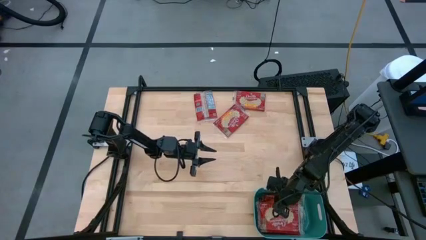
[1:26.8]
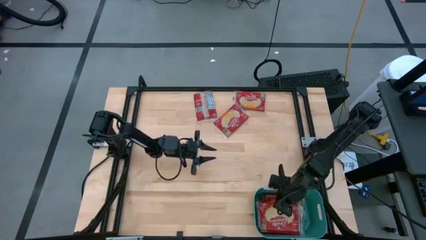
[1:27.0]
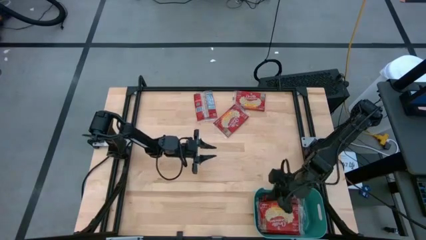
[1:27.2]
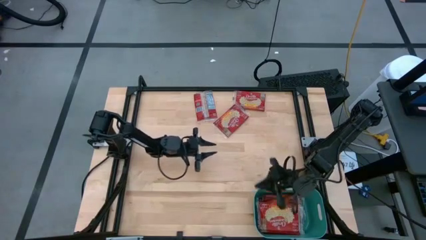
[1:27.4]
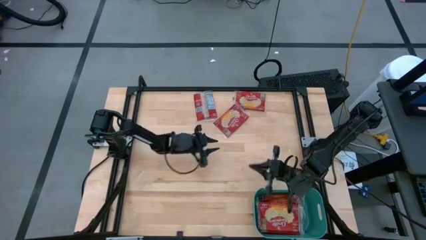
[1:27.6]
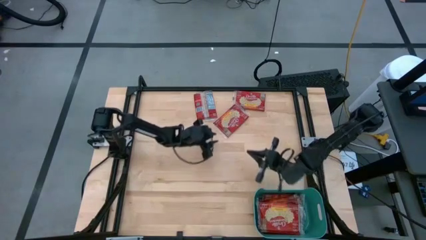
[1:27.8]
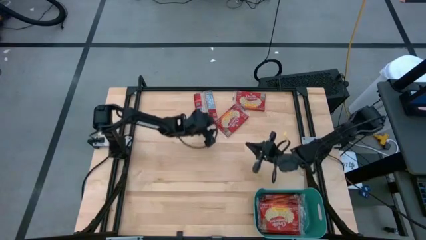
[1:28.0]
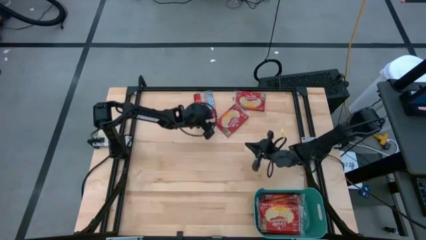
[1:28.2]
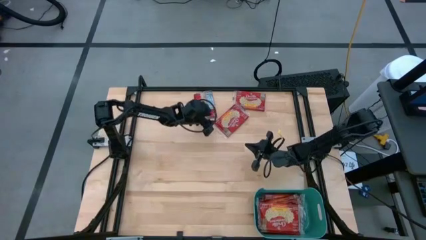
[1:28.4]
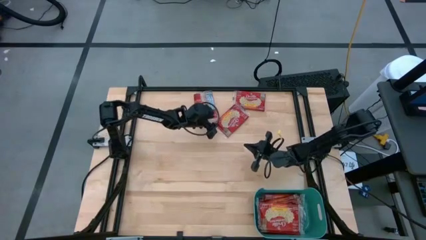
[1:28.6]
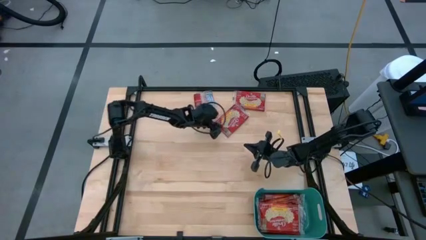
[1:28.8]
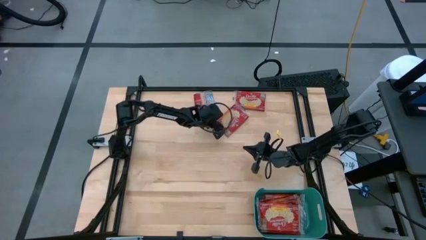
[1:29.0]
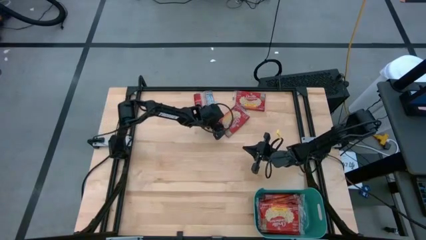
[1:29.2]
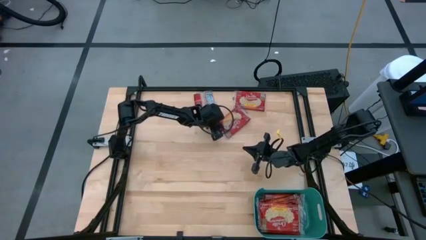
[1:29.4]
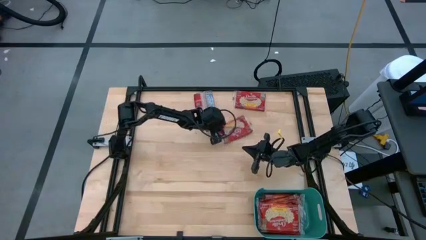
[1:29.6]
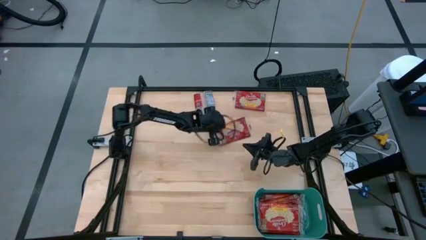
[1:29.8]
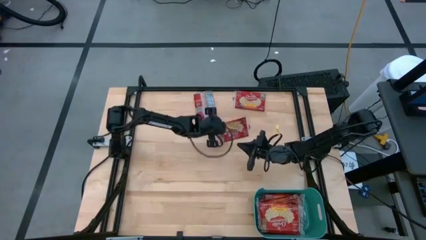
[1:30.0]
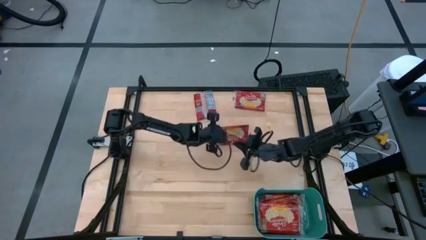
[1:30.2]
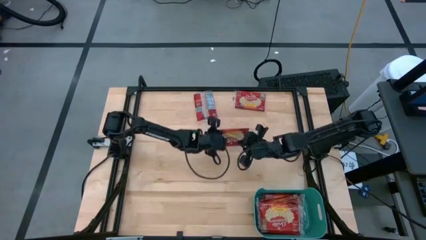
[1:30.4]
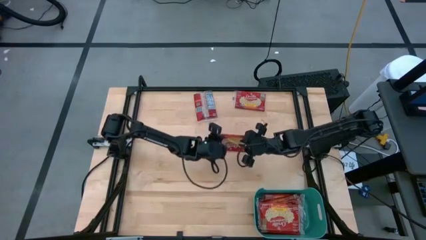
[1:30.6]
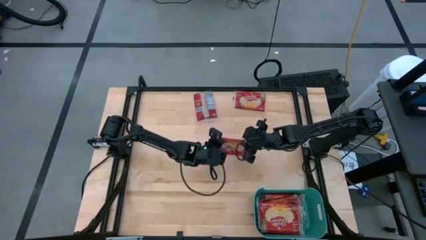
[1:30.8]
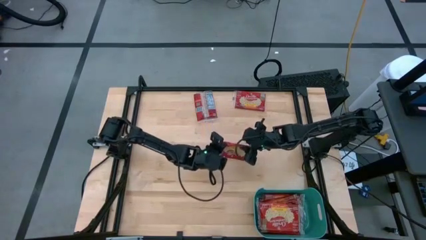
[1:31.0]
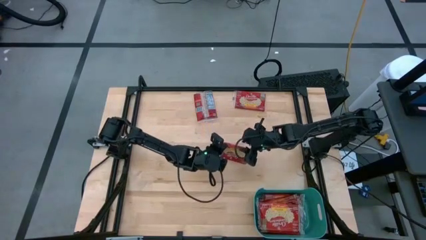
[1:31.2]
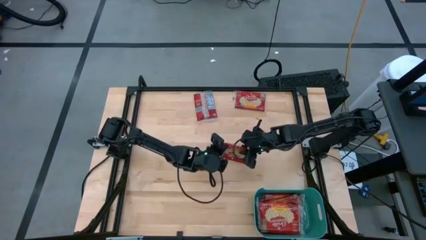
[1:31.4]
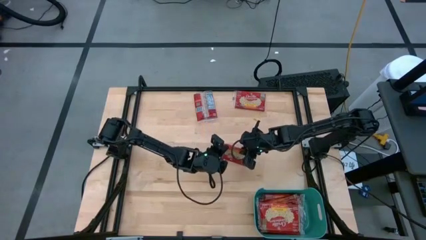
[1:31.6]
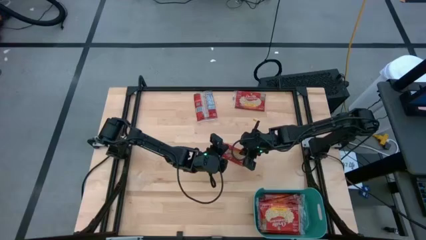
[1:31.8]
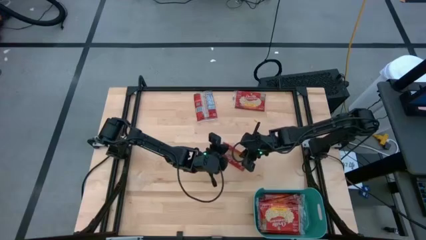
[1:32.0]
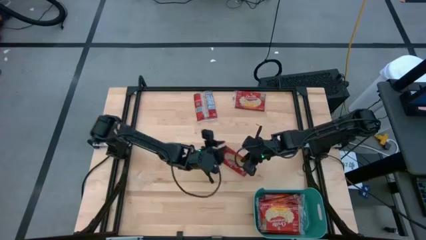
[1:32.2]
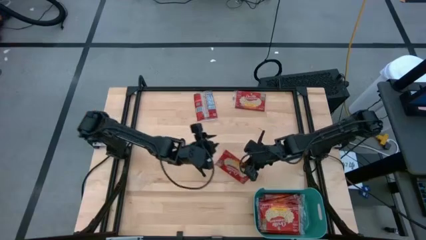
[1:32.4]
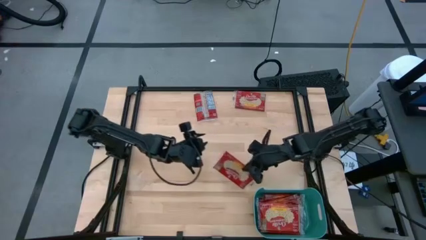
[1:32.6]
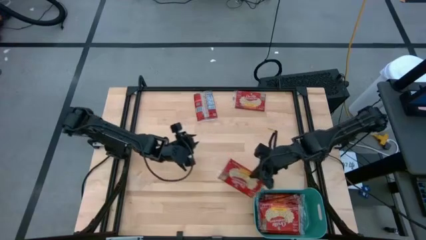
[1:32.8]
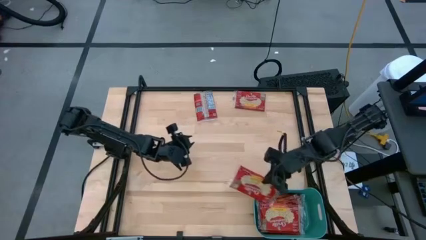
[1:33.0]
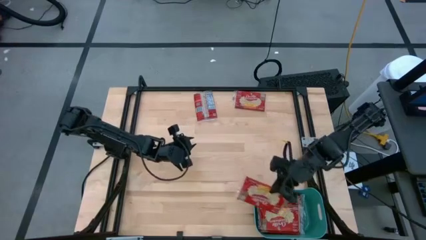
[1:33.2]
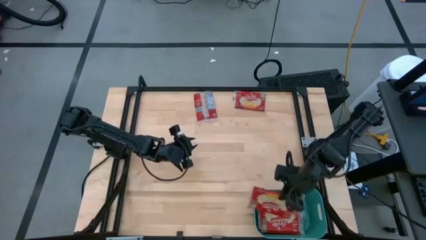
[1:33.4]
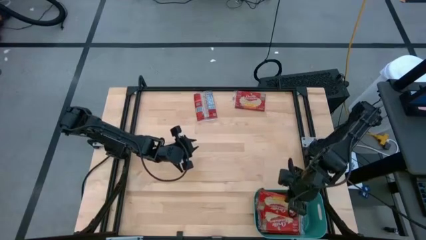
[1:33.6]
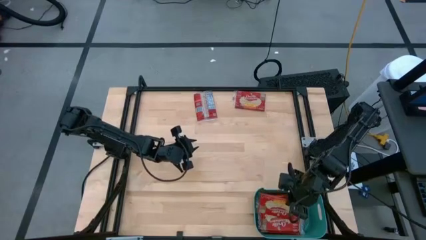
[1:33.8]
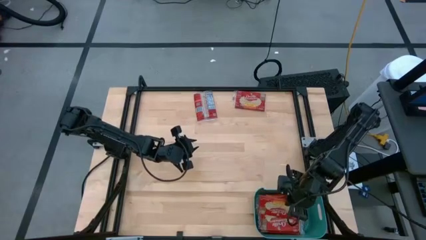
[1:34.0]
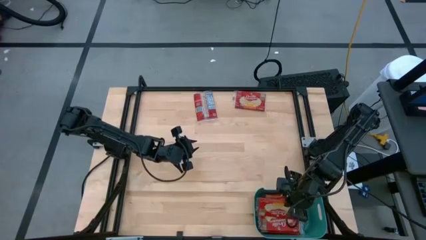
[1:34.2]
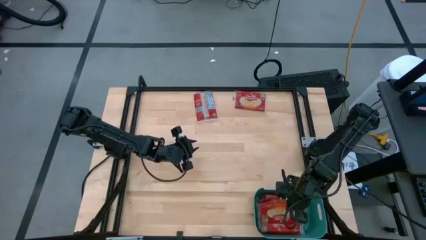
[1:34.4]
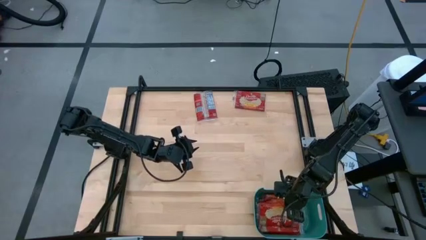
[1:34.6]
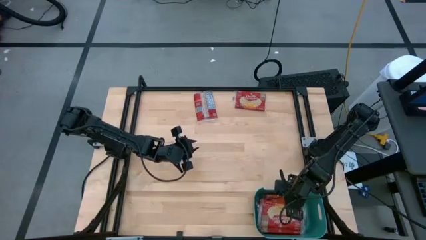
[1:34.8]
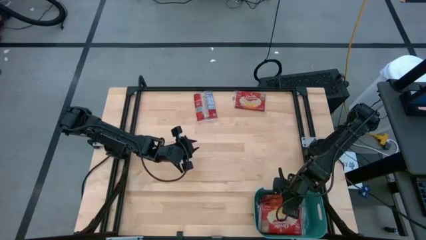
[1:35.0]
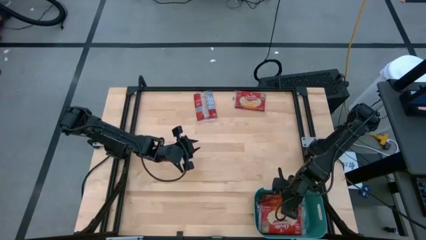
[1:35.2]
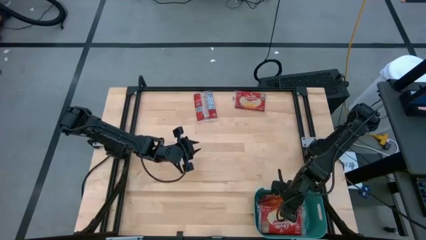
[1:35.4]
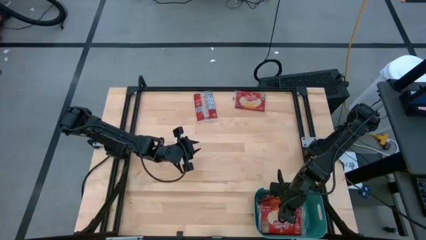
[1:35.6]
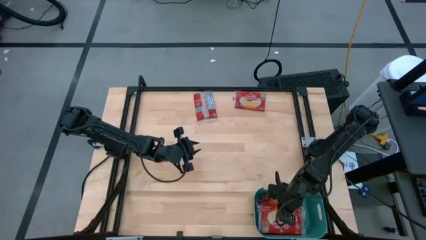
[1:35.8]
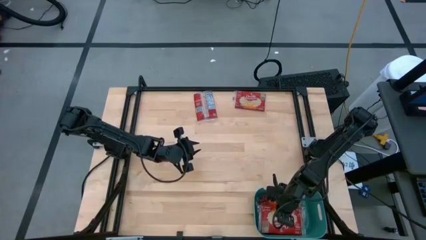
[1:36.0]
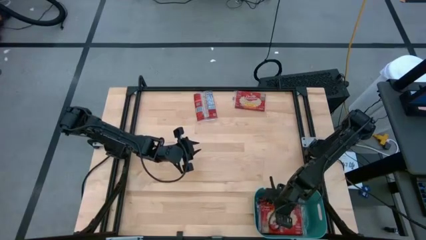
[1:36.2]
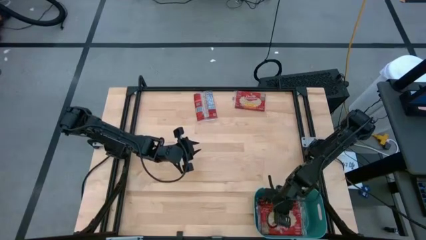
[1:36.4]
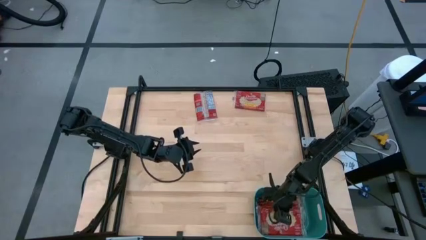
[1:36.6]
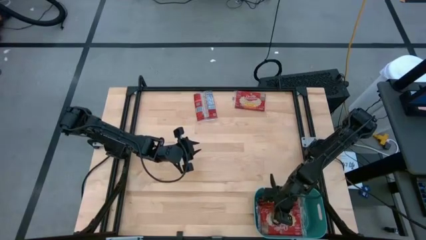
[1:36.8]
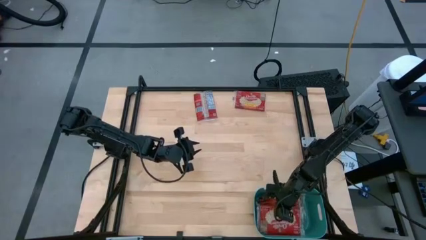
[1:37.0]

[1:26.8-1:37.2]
Task: Sort popcorn bags into baskets
Put the bottom popcorn bag into the green bin

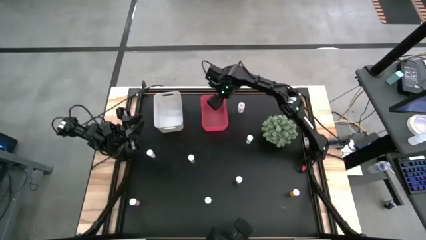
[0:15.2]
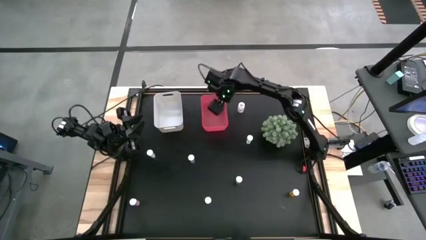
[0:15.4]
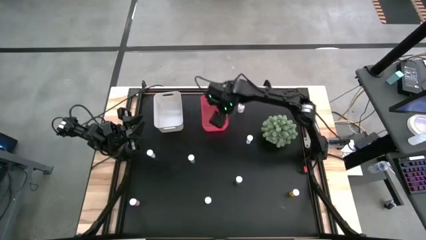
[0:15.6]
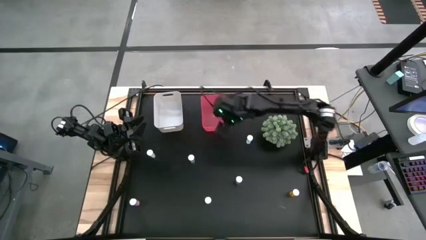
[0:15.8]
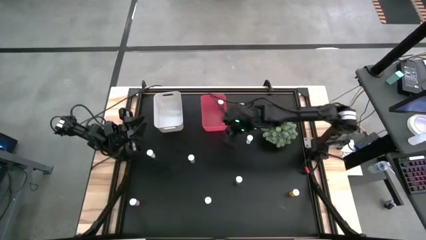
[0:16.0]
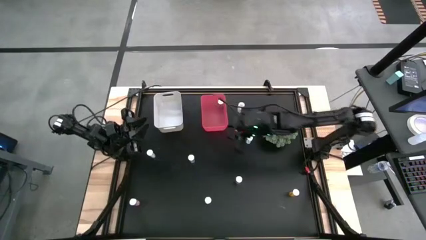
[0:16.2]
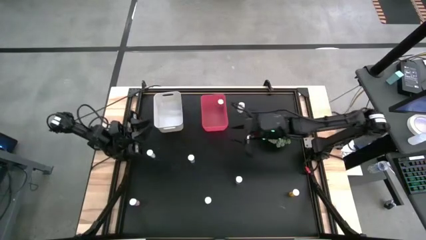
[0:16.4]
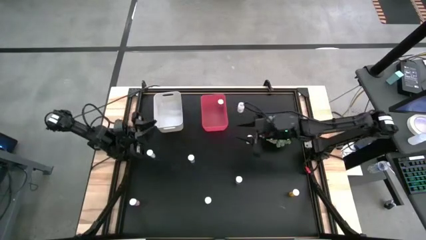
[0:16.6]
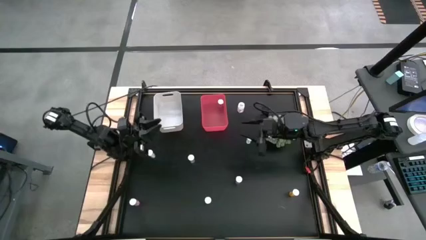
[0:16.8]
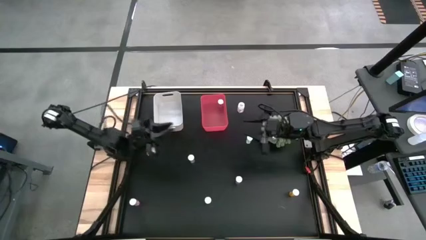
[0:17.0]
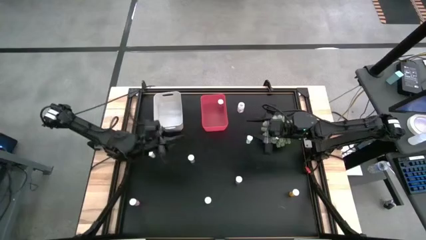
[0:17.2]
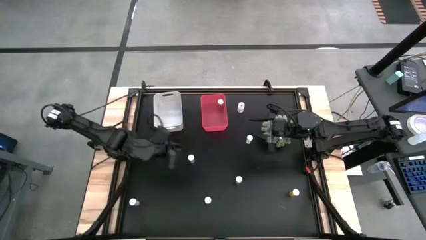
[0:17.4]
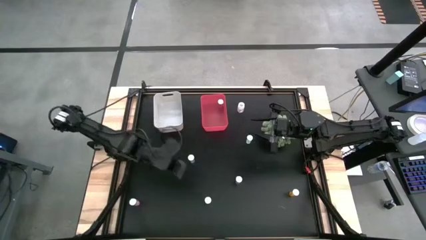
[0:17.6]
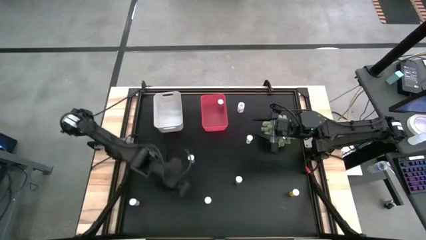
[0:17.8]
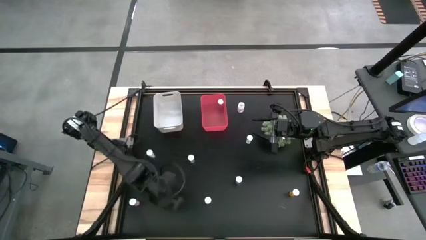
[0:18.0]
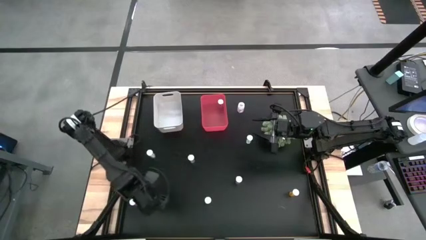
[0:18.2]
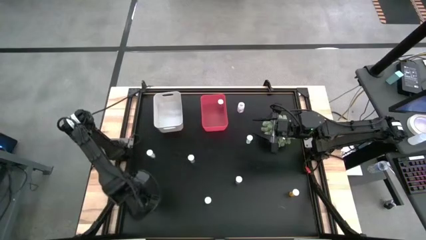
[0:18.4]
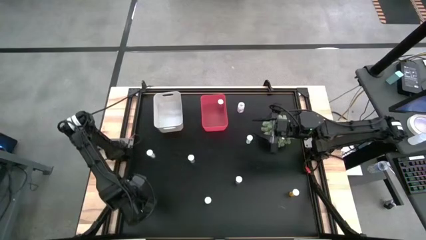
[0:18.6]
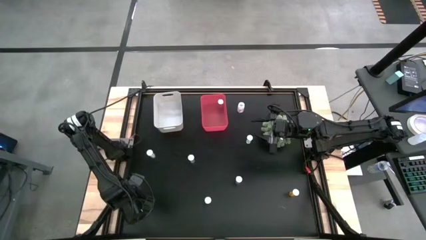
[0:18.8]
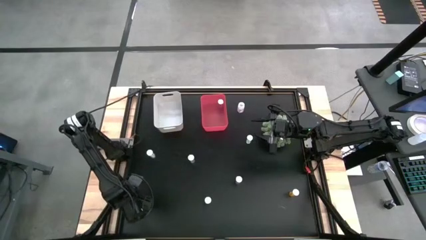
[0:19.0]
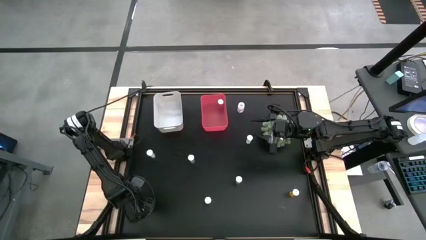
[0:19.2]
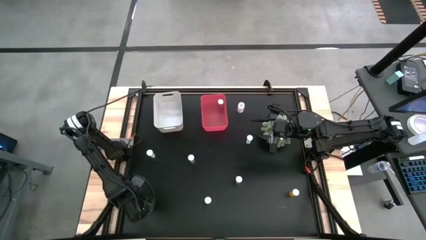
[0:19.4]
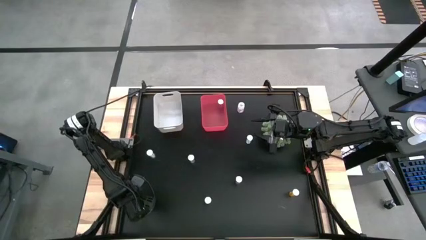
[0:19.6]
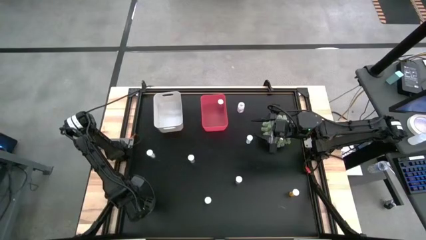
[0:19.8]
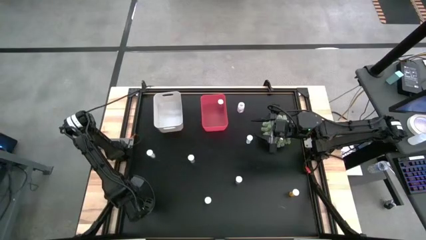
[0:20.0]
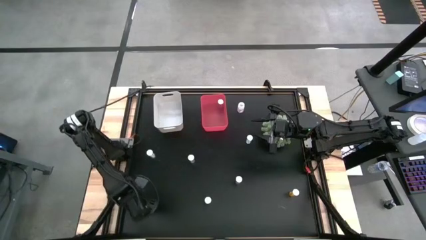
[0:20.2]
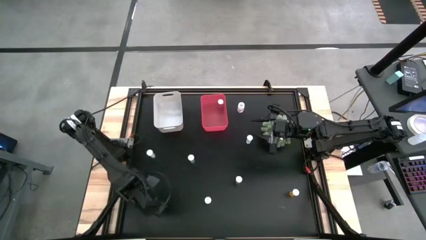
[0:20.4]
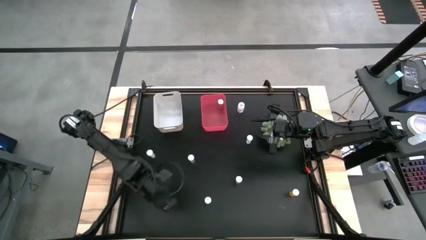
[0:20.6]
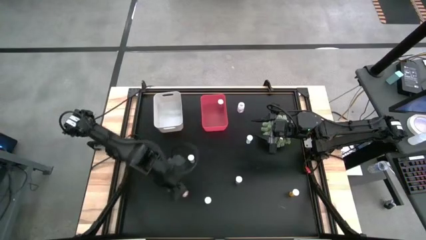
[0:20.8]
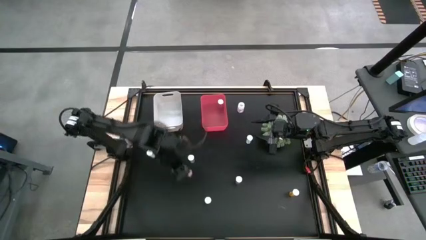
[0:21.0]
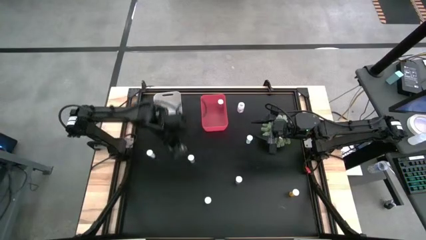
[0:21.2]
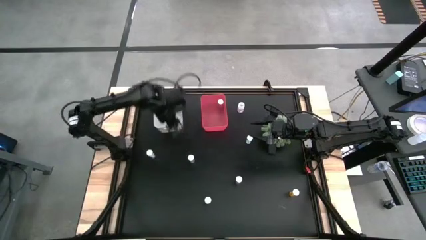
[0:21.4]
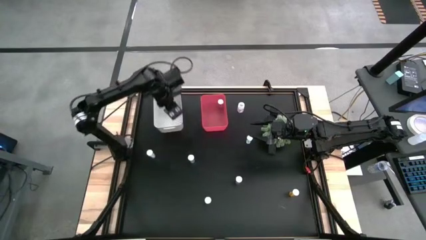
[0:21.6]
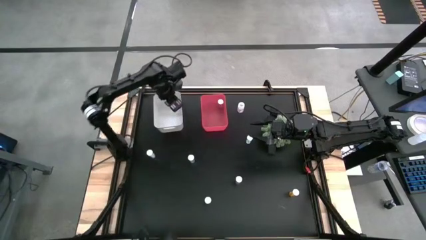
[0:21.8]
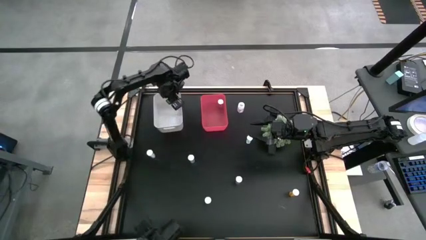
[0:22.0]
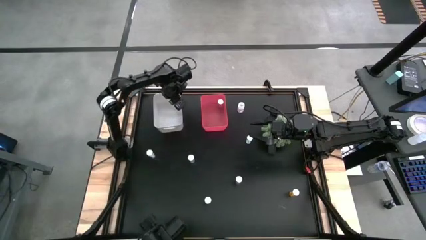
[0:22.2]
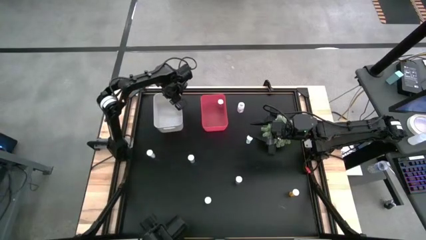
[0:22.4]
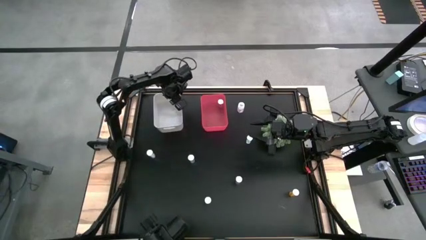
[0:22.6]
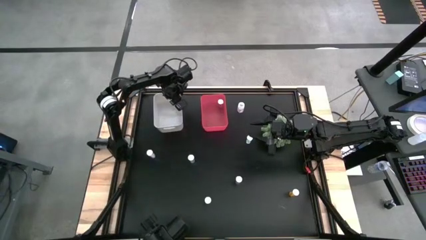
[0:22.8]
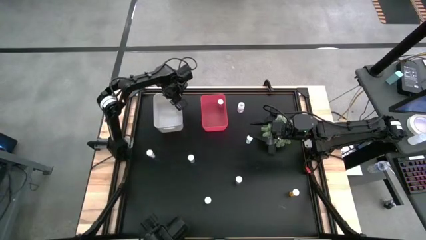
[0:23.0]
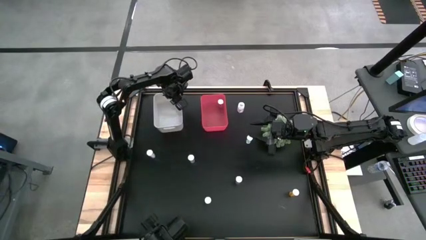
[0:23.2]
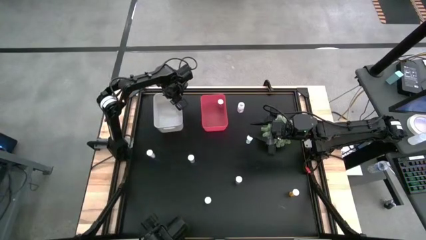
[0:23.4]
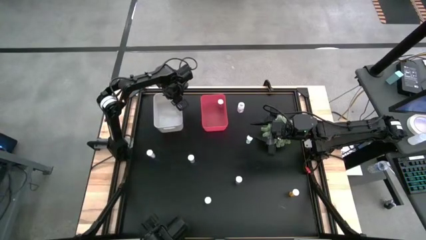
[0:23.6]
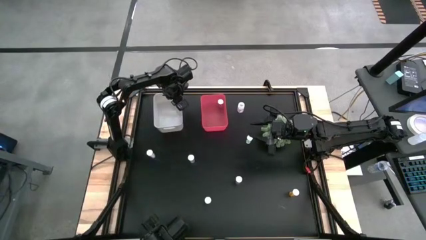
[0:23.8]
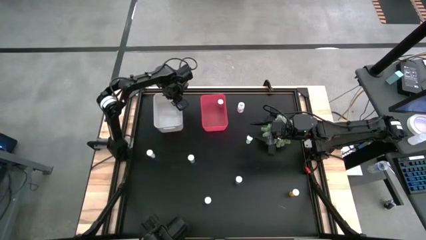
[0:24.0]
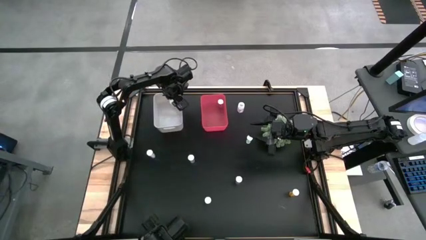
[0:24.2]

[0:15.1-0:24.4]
Task: Pick and place medicine bottles into bin by pill shape (circle, oval)
Put the pink tablet bottle into the white bin
